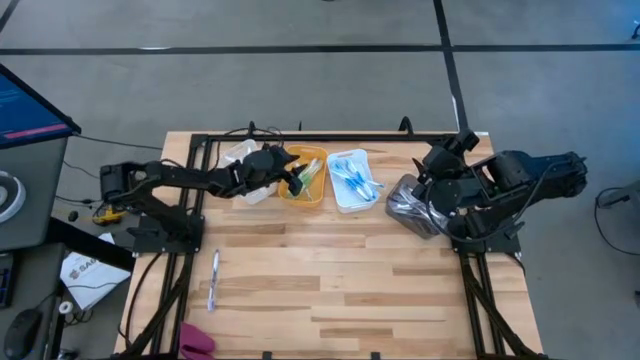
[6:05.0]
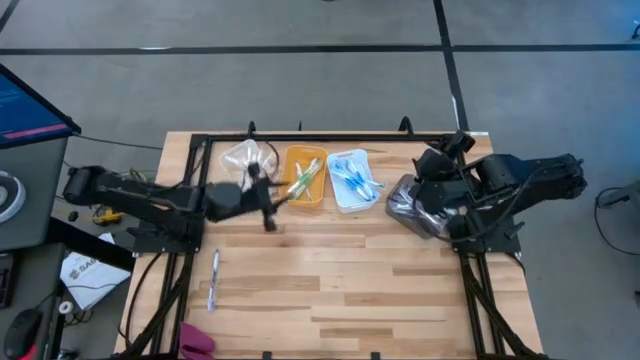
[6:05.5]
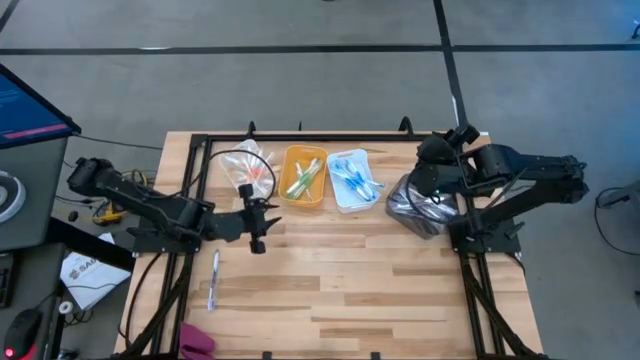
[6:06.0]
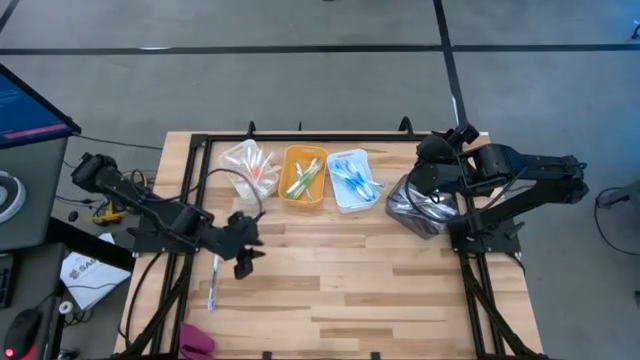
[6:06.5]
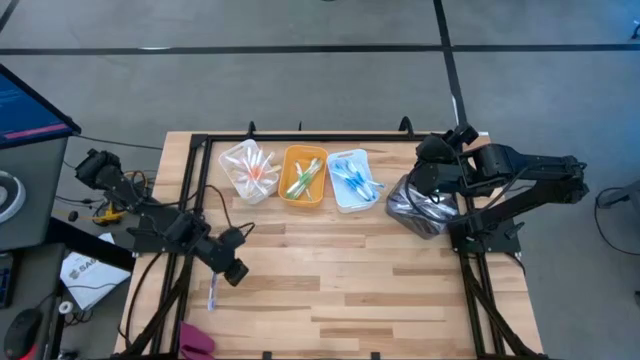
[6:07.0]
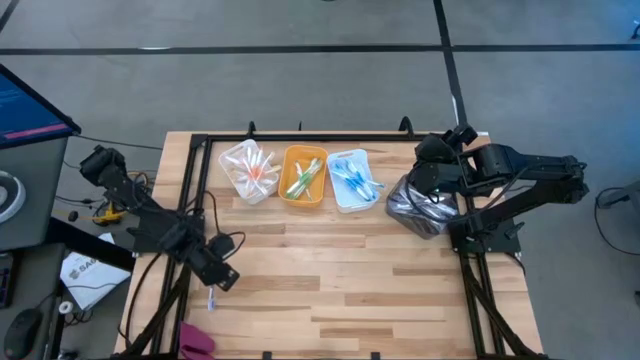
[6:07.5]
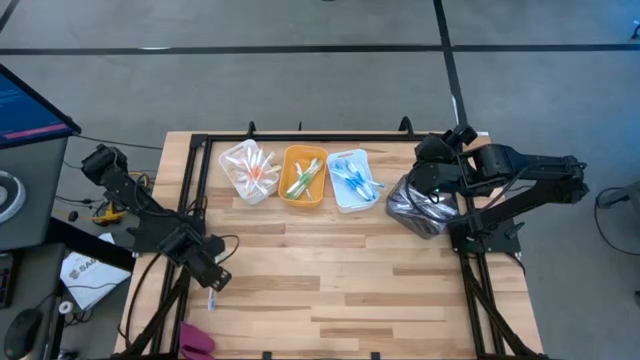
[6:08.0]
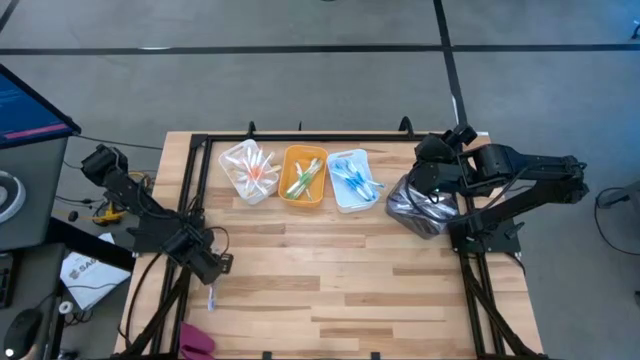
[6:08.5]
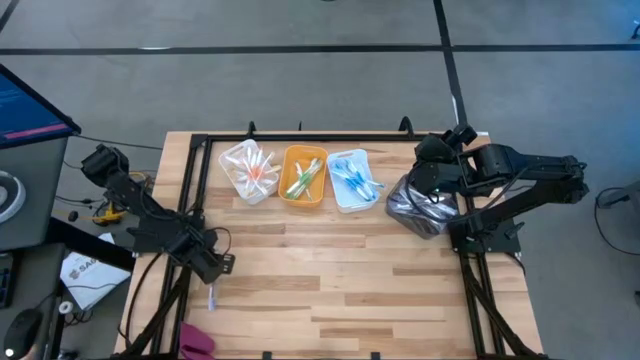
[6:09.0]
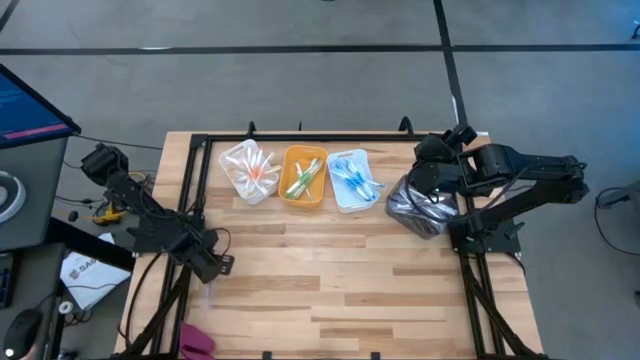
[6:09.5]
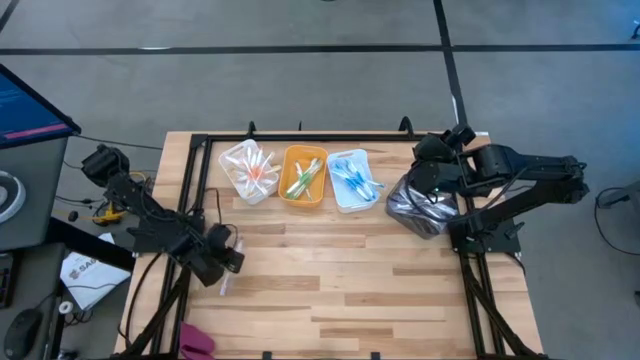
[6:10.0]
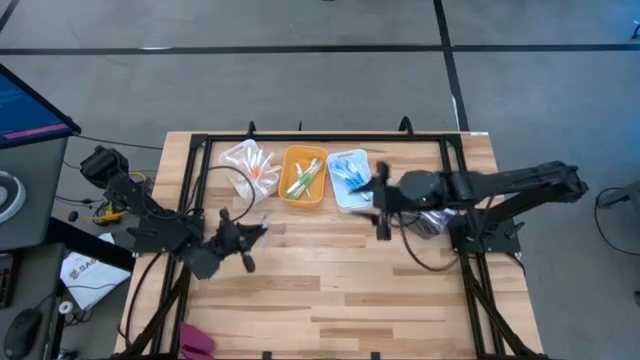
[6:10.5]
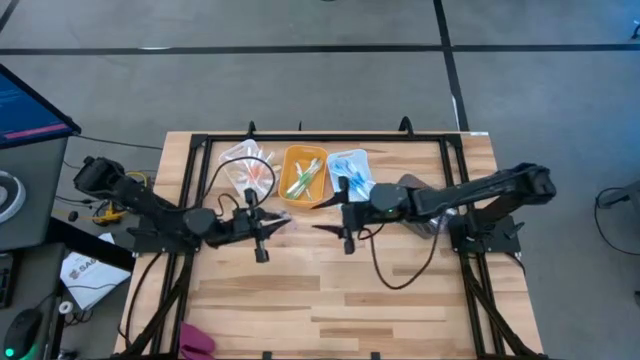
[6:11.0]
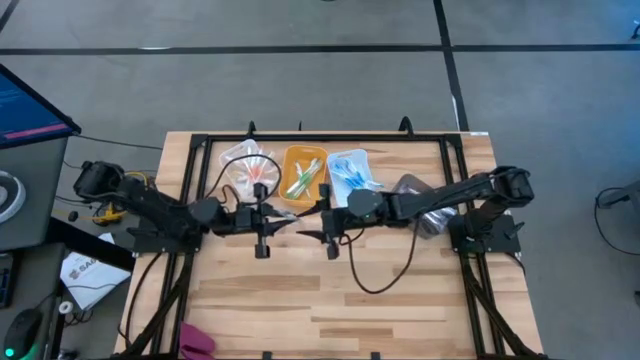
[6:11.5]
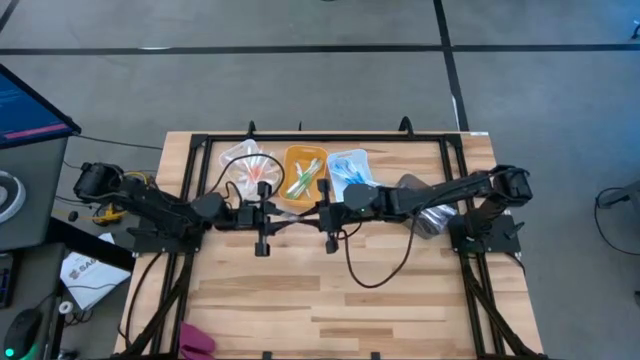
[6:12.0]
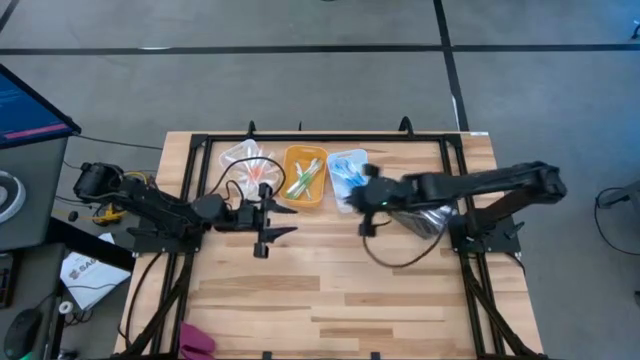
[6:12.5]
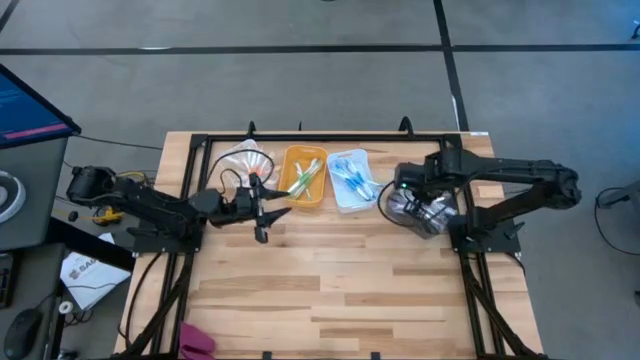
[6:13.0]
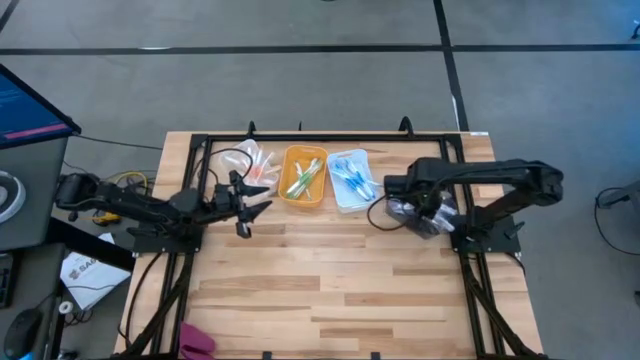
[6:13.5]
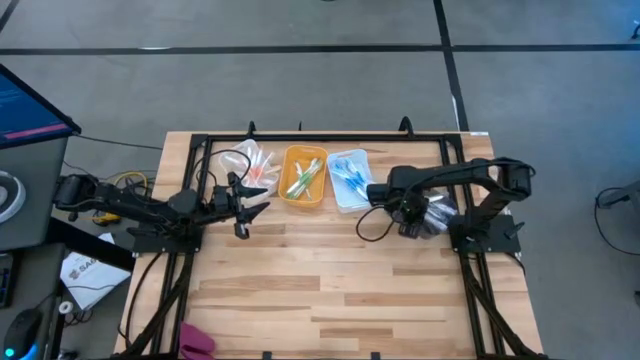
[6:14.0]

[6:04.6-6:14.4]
Task: Pick & Place Toothbrushes
Put the white violet toothbrush into the black transparent bin

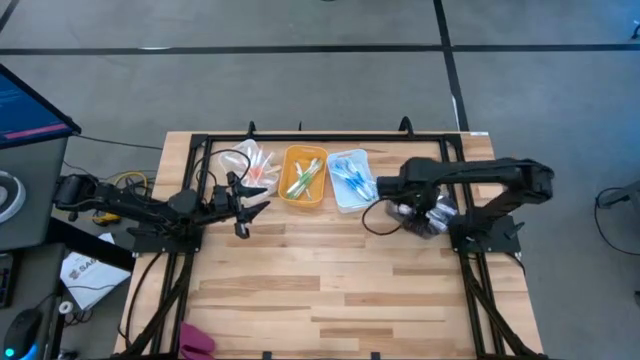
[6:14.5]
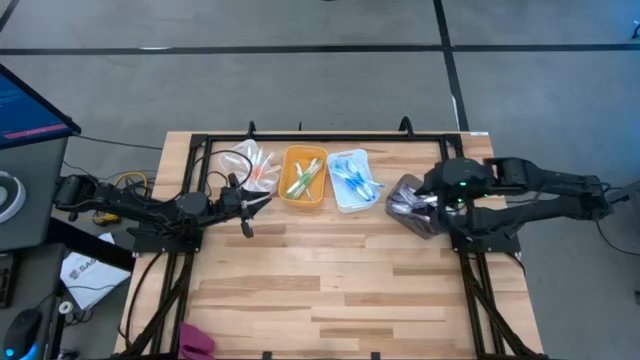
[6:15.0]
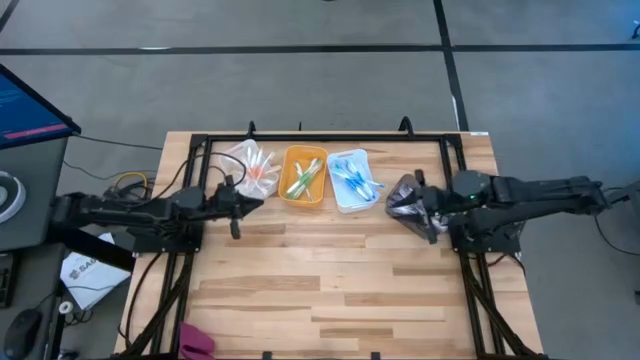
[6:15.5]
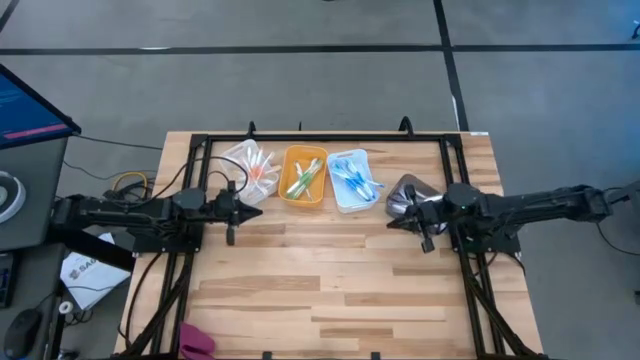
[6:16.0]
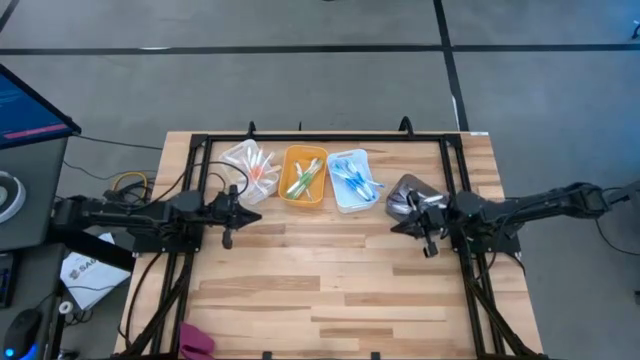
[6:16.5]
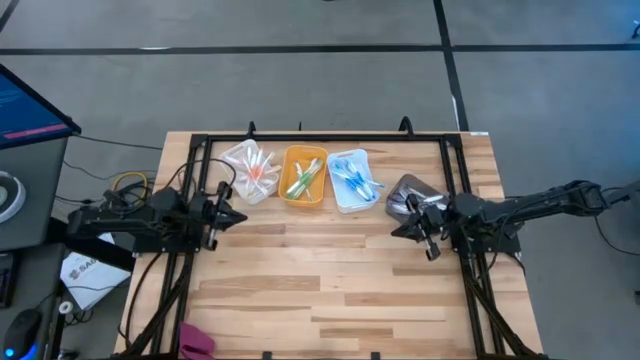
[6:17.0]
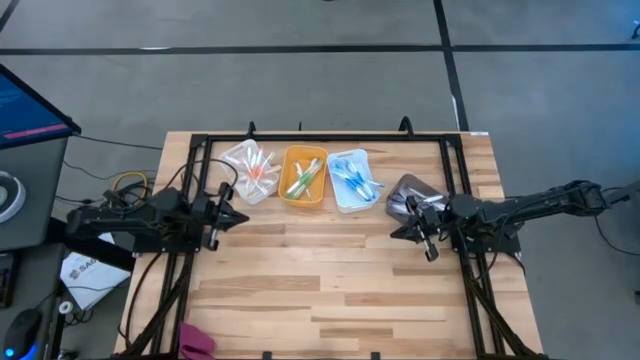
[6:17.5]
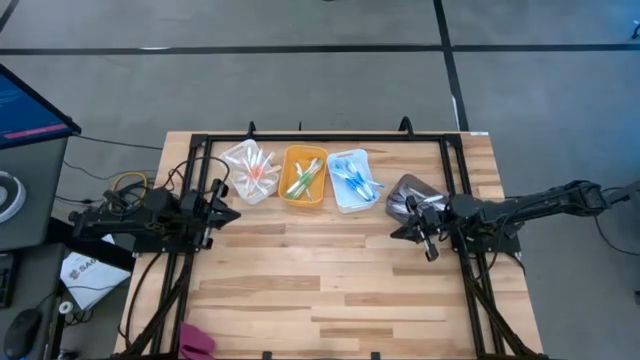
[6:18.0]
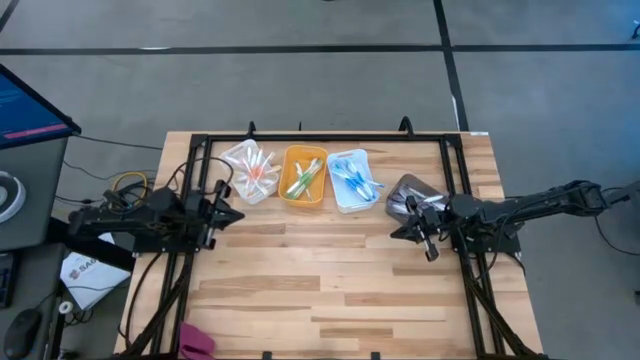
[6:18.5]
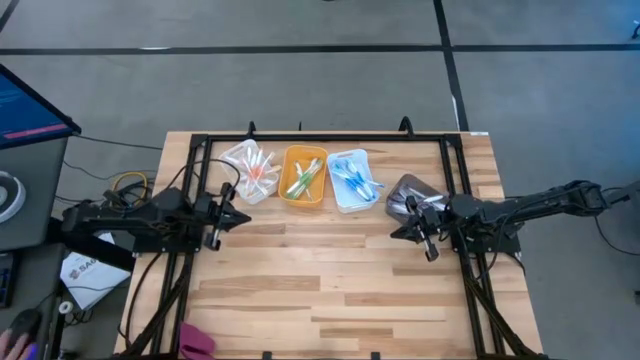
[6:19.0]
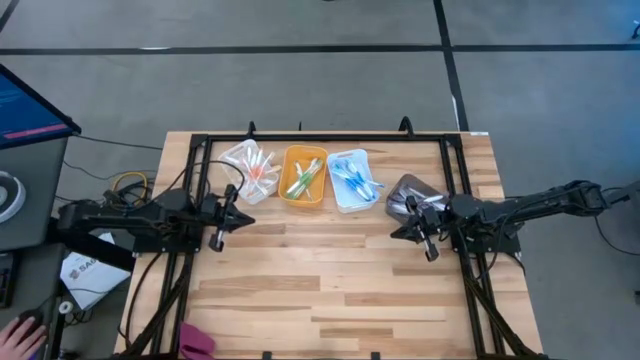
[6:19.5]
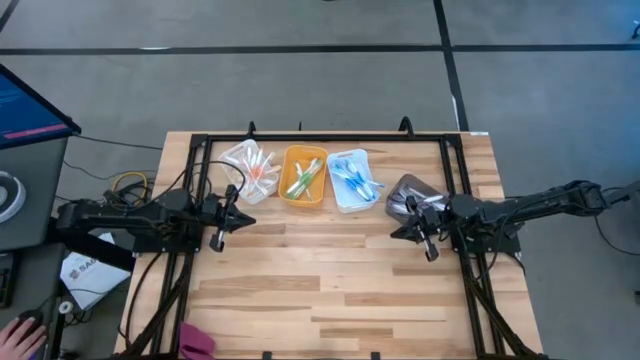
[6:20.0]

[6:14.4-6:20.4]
Return to Home Position

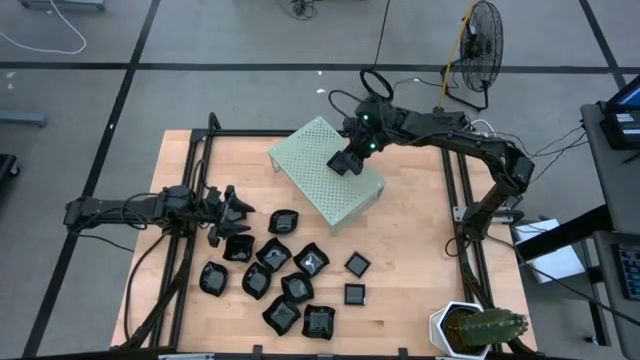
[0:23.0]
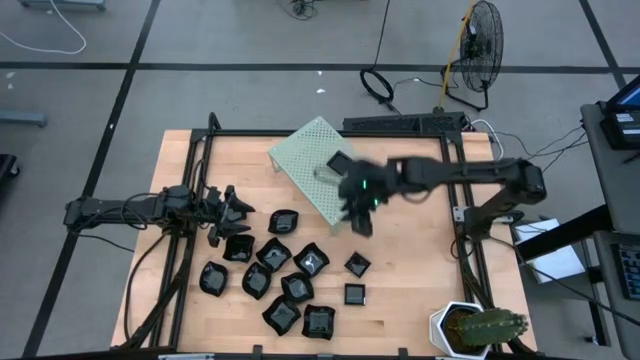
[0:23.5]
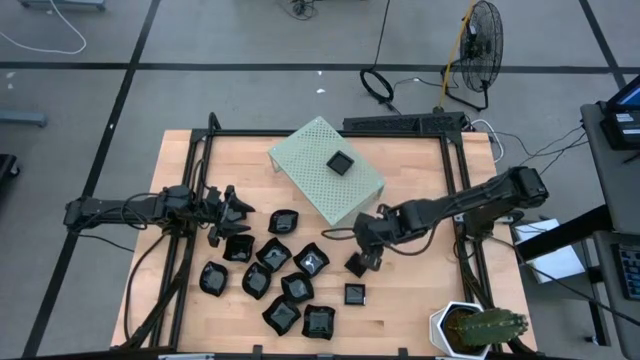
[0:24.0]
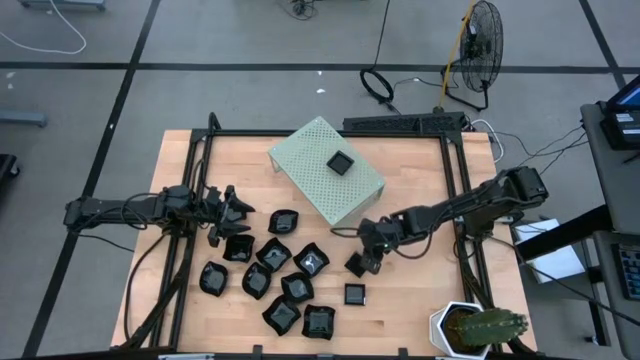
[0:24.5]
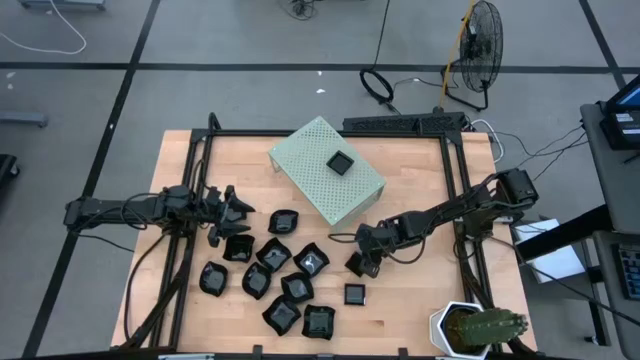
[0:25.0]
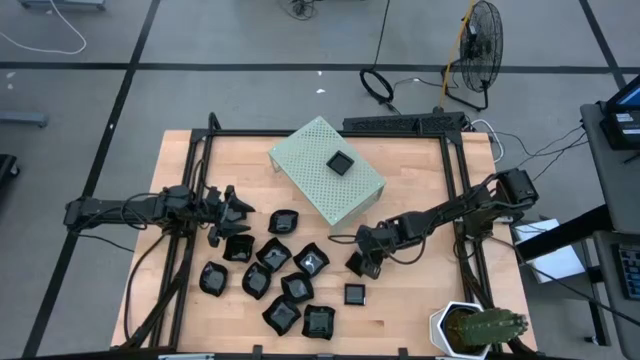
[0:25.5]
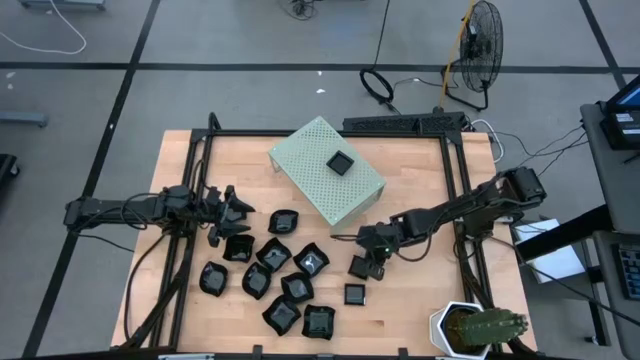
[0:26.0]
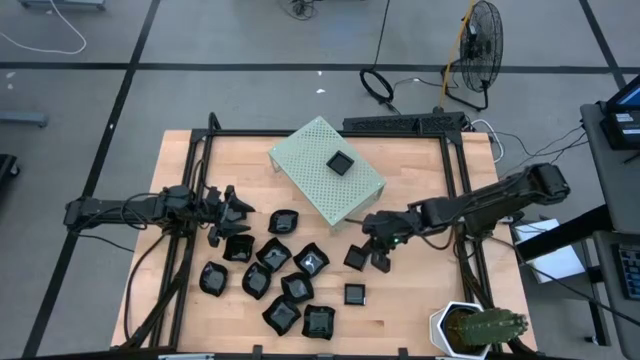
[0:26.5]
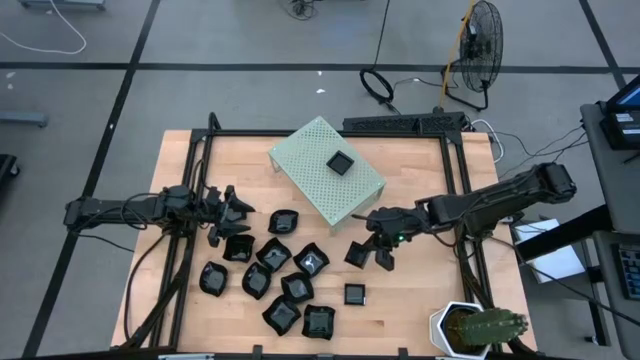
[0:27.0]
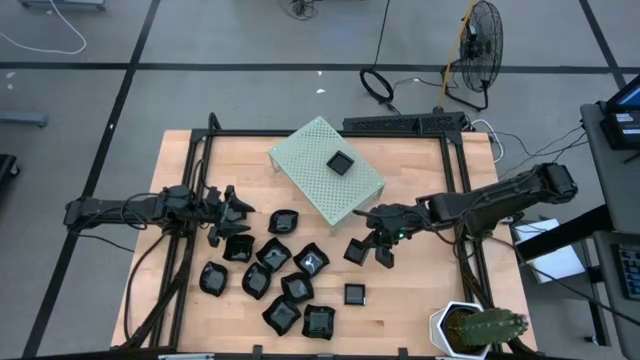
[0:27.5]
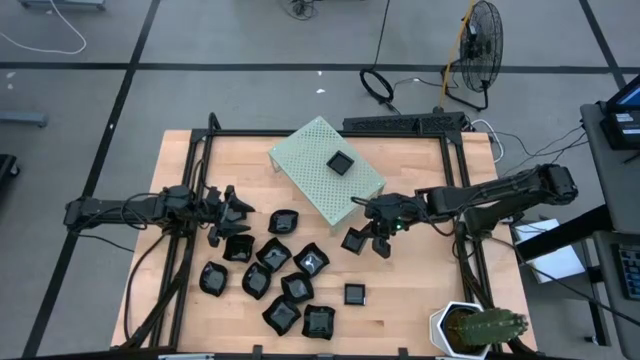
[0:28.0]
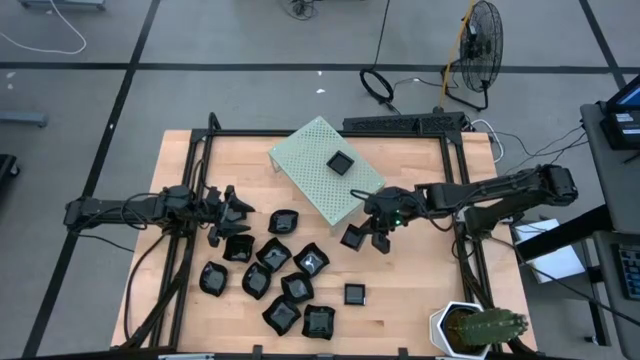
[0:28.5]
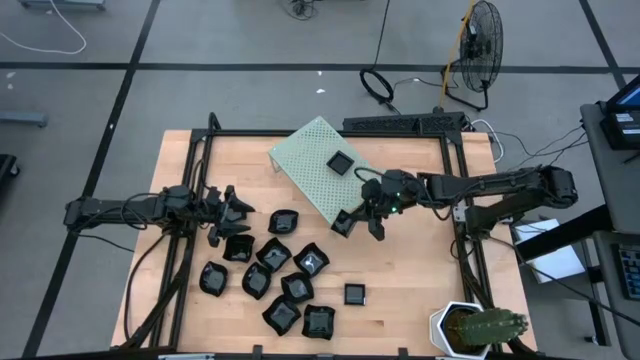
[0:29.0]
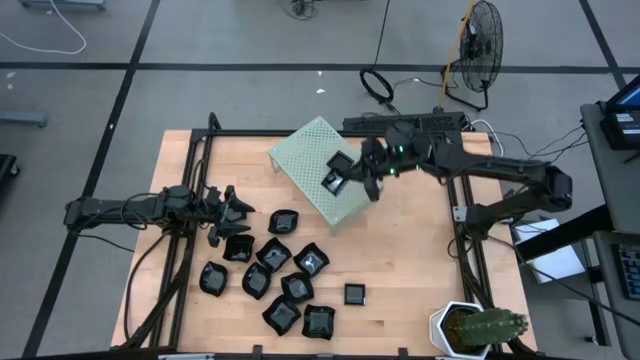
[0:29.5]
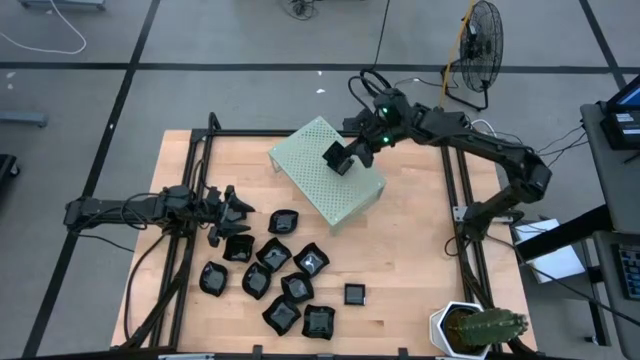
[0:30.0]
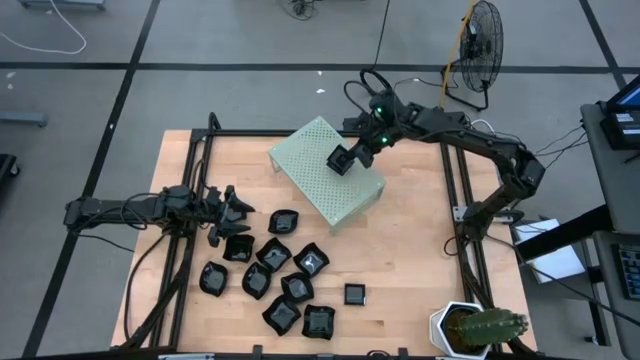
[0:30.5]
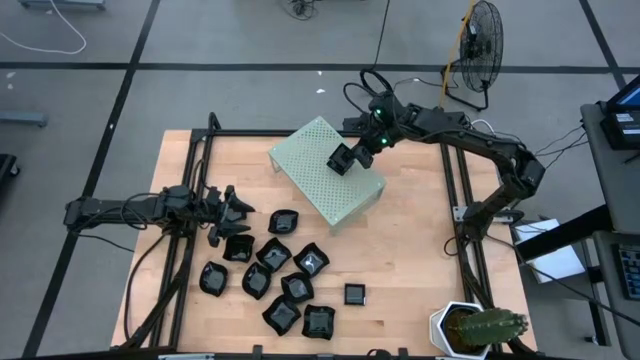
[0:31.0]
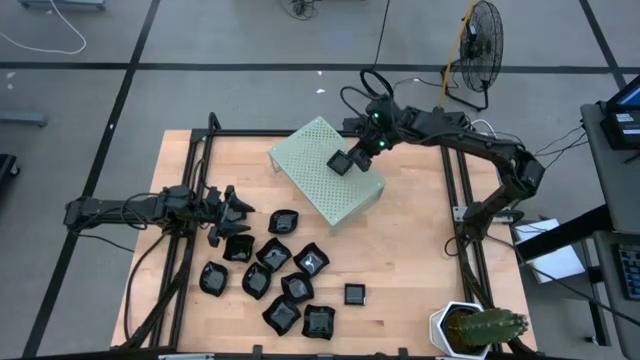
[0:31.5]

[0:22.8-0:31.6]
Task: Pick & Place Mini shaped plates
Stack the square plate on top of the other square plate on the shelf
